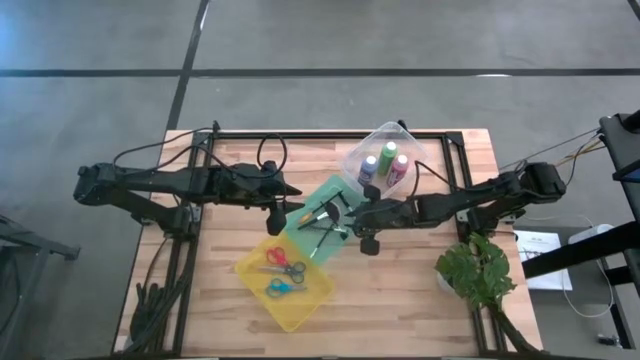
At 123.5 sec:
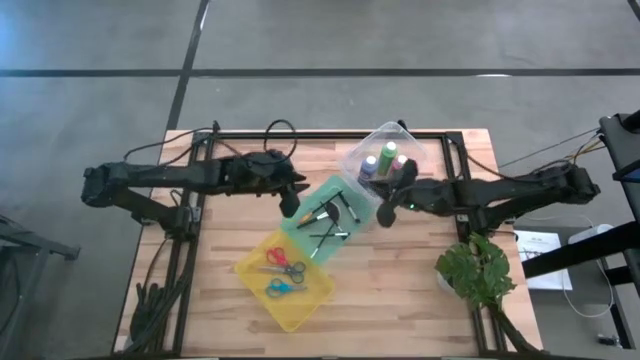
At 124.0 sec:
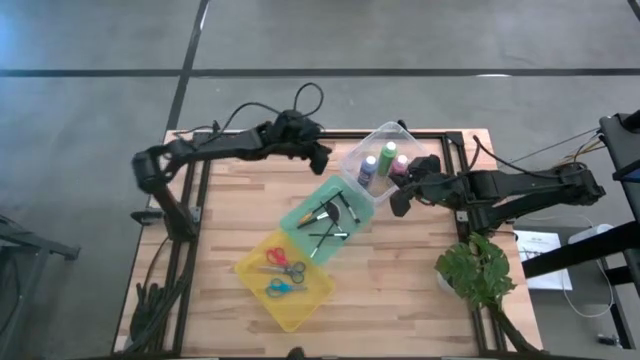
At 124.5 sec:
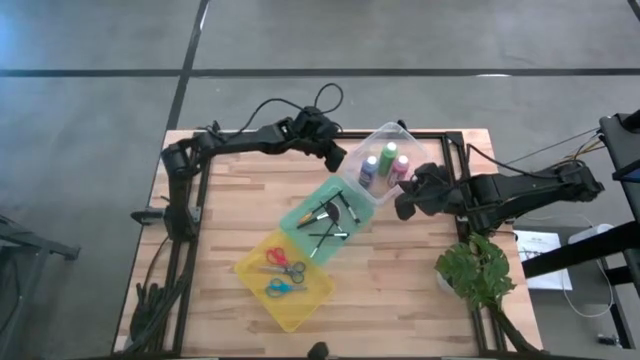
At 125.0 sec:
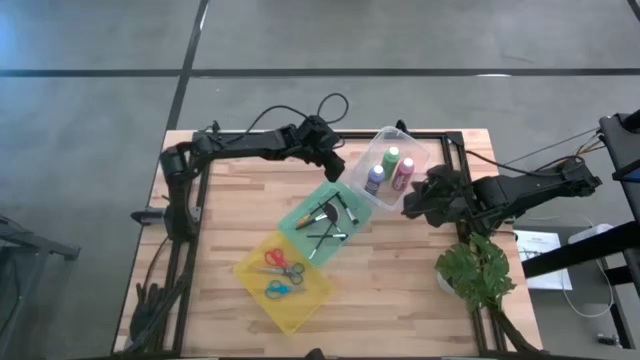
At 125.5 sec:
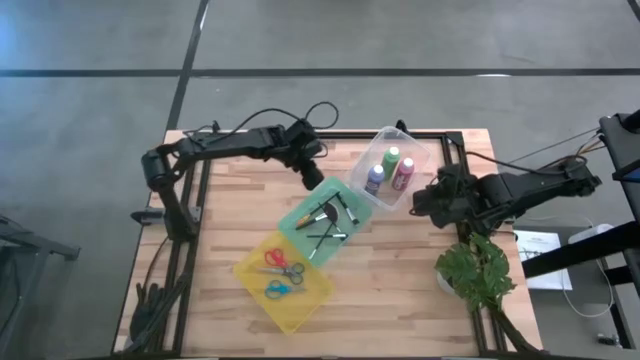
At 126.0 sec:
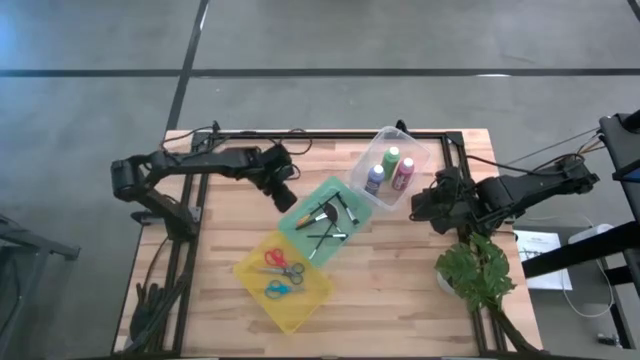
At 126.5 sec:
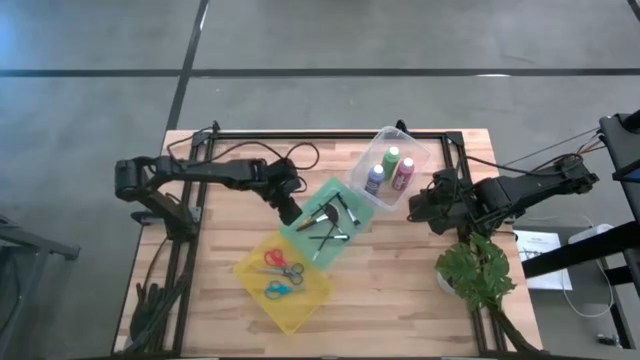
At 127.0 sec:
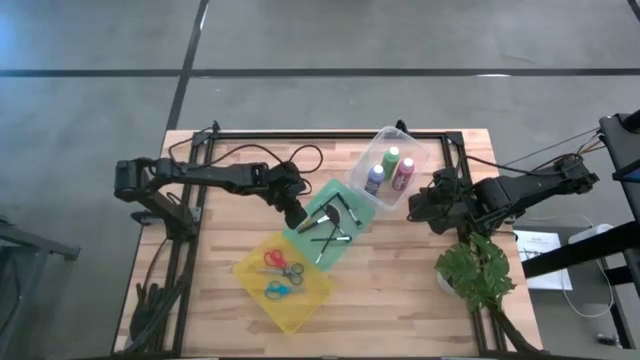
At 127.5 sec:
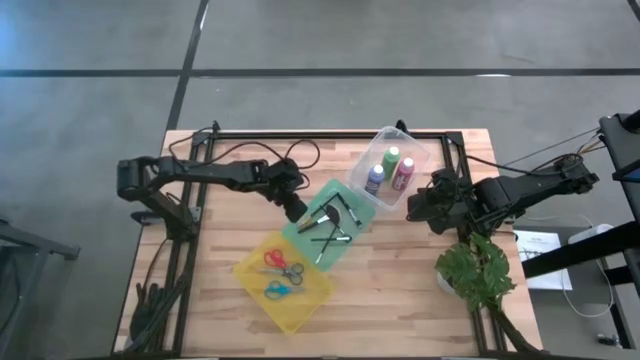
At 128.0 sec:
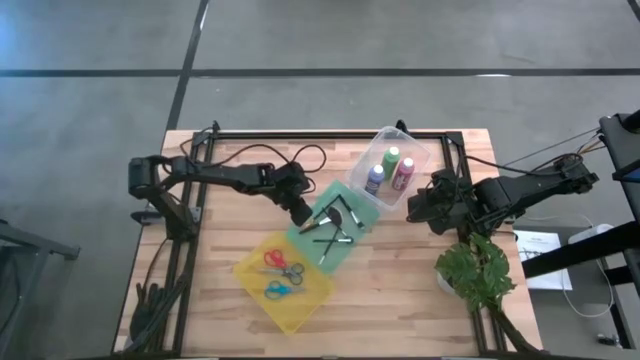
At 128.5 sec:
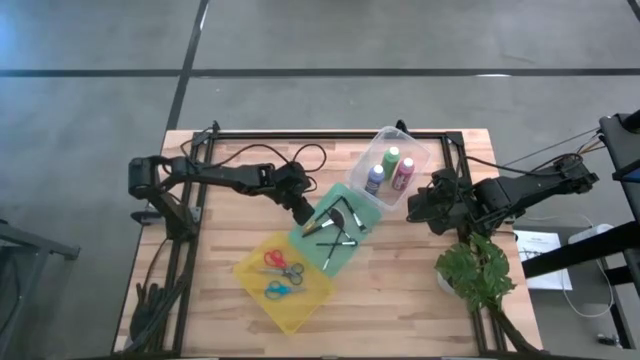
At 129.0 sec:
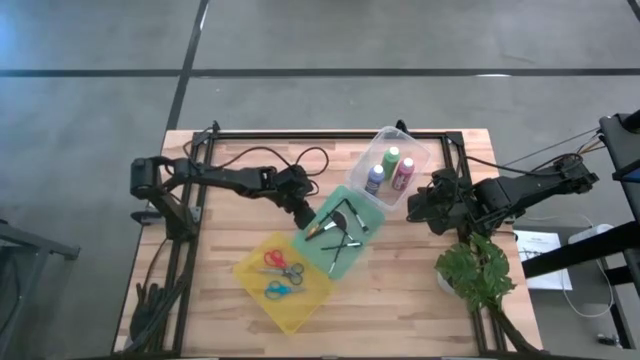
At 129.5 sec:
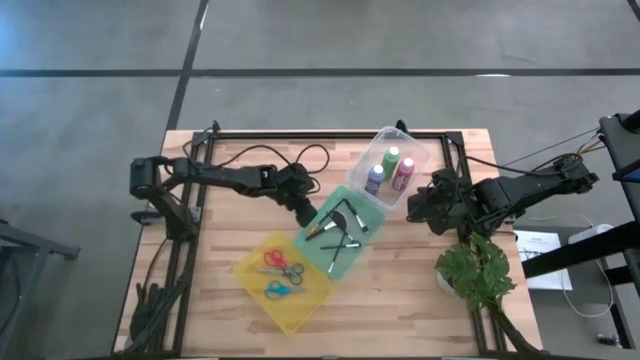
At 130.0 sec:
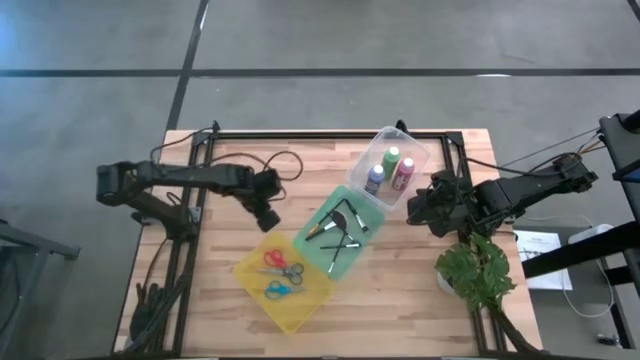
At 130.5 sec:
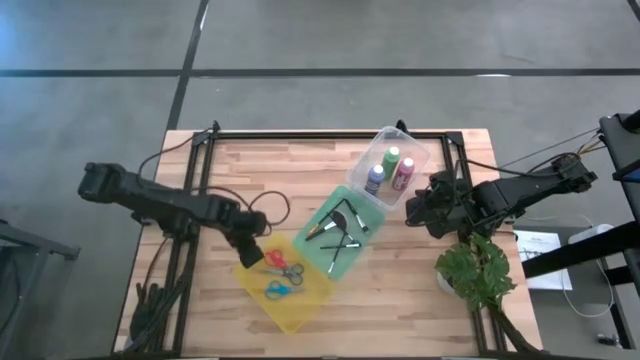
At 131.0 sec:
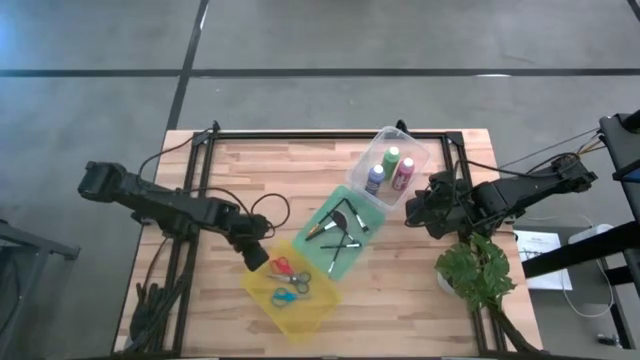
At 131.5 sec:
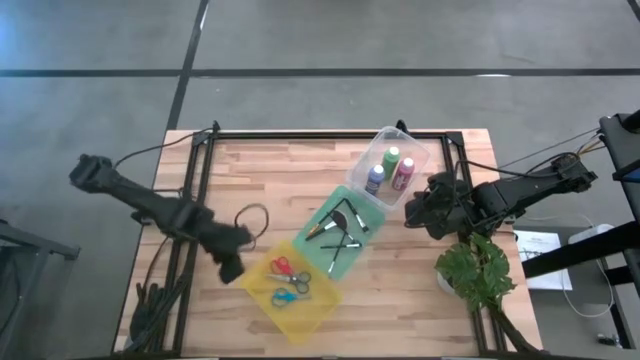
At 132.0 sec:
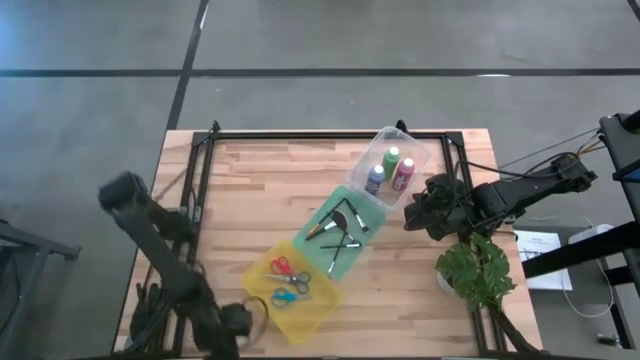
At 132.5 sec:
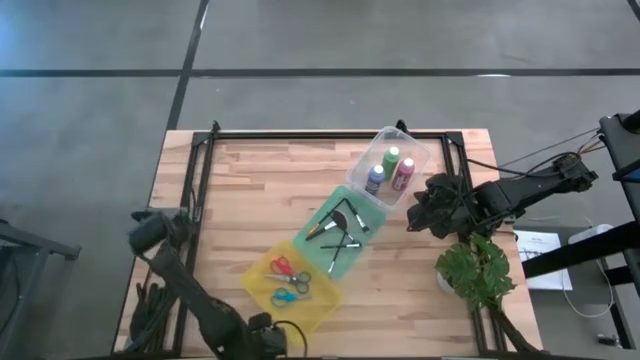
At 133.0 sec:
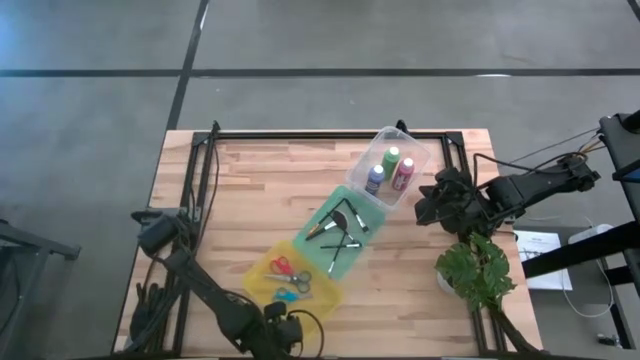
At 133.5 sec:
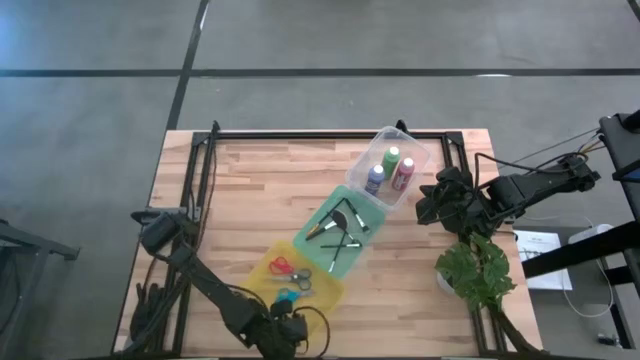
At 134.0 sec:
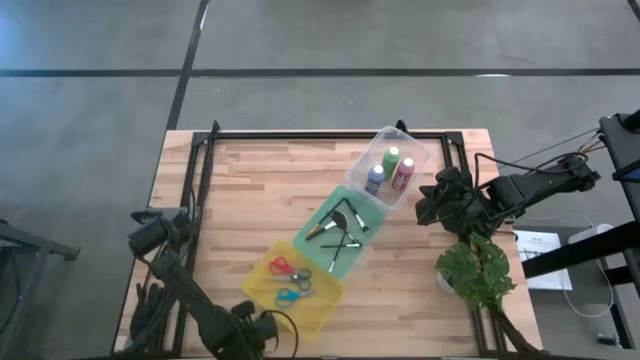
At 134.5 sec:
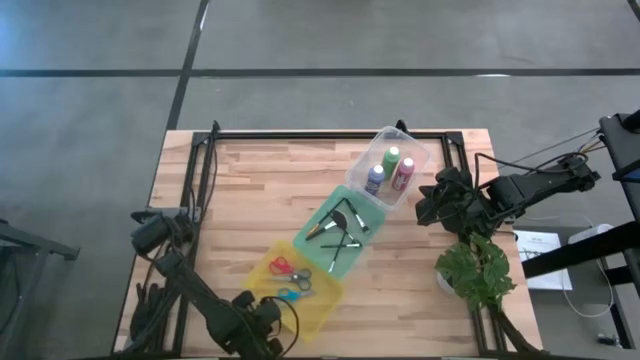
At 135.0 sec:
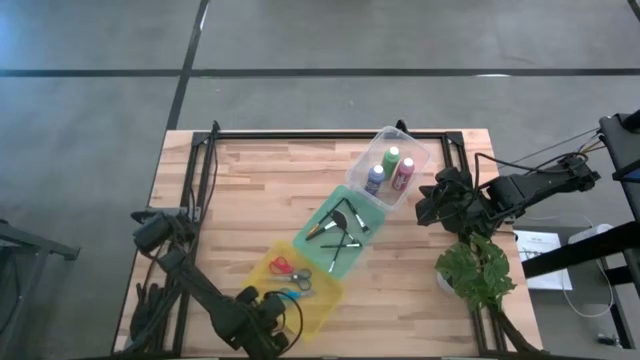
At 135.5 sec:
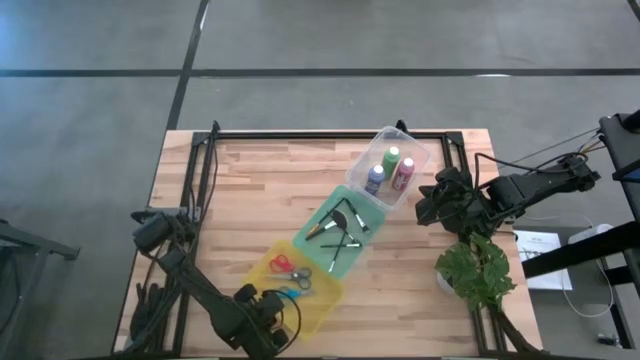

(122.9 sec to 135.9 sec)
Task: Pick & Place Paint Supplies
Adjust the bins

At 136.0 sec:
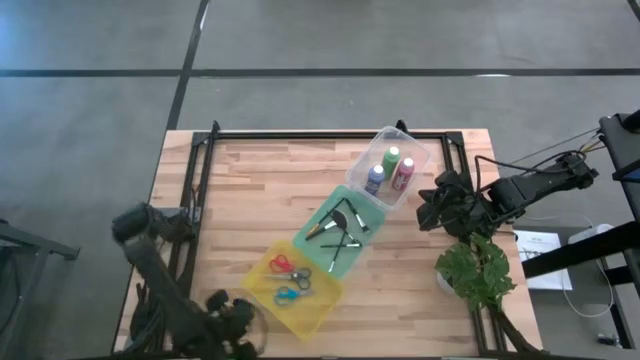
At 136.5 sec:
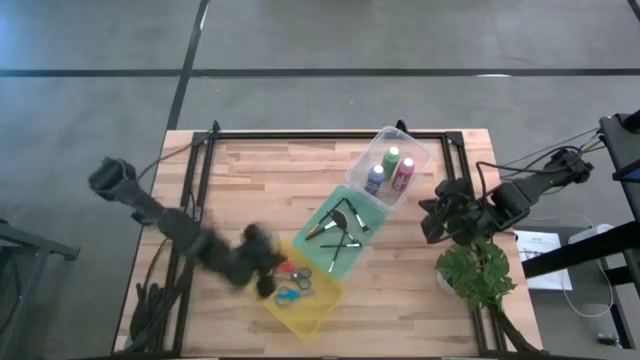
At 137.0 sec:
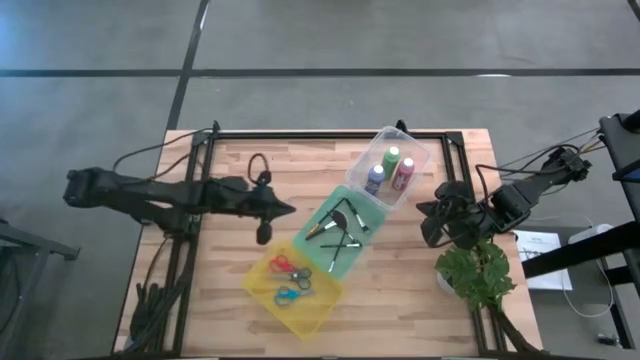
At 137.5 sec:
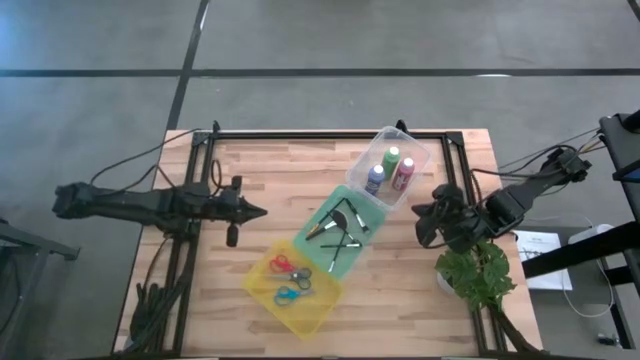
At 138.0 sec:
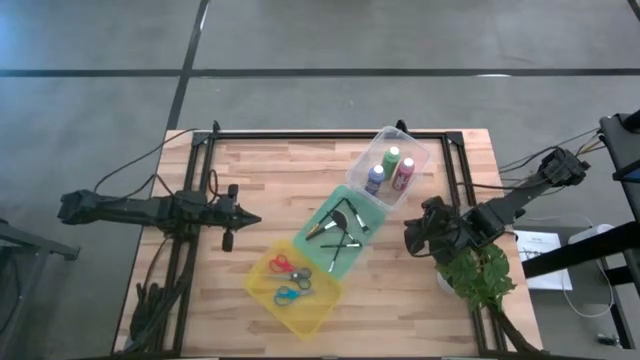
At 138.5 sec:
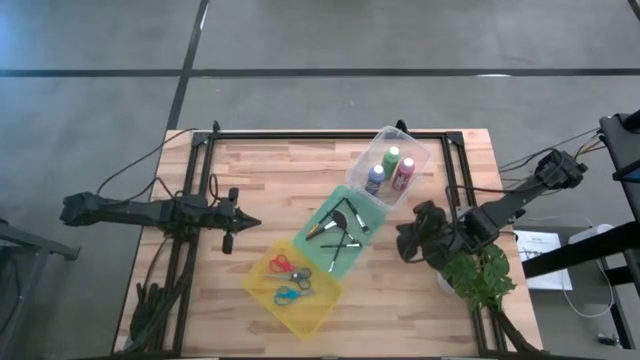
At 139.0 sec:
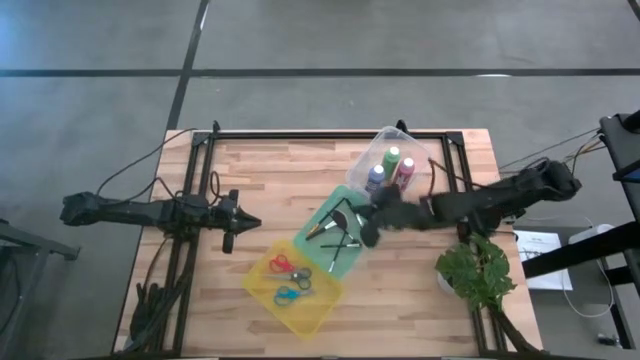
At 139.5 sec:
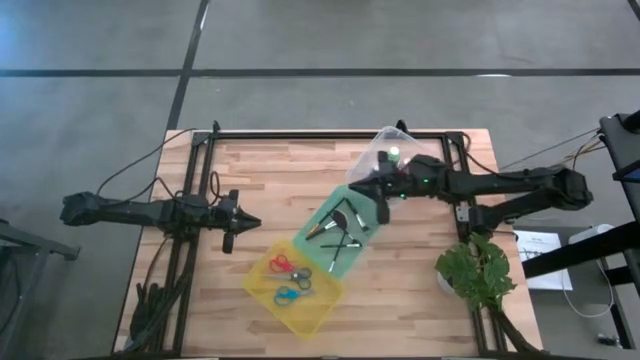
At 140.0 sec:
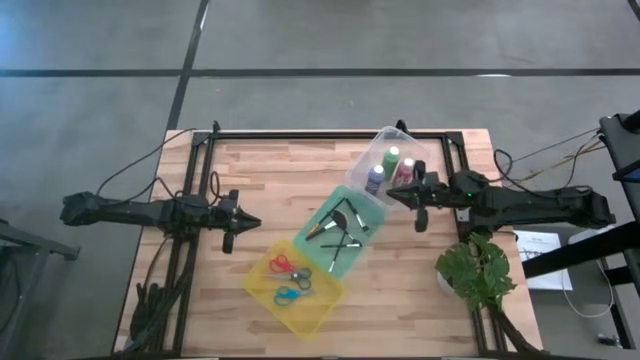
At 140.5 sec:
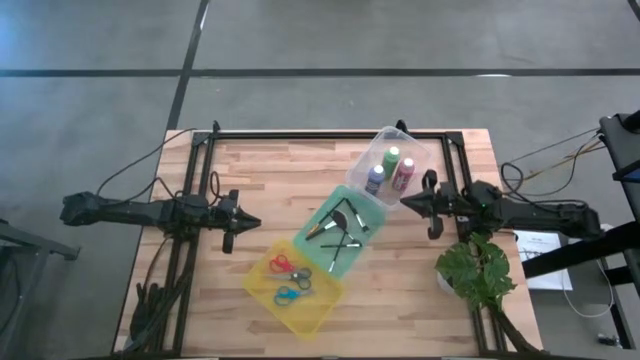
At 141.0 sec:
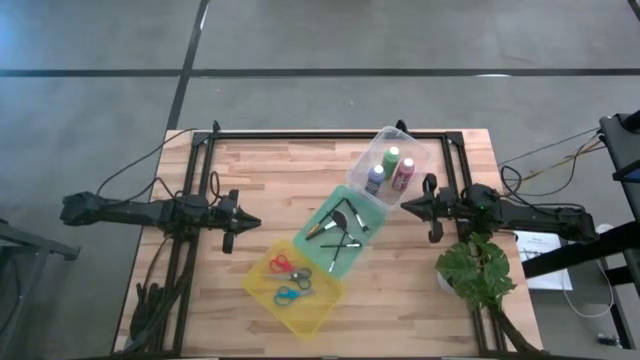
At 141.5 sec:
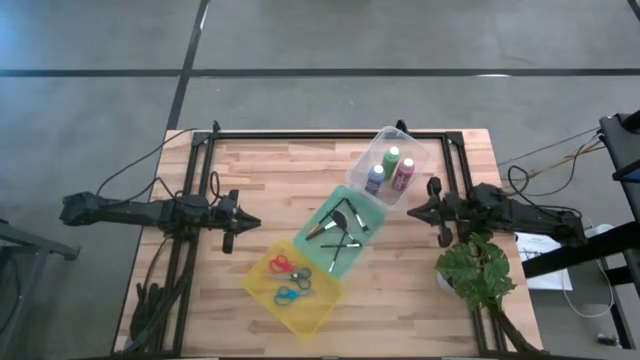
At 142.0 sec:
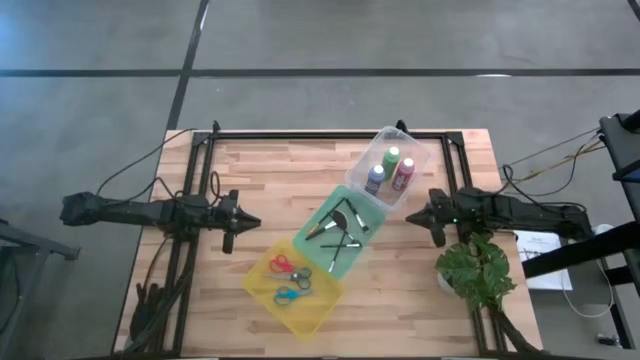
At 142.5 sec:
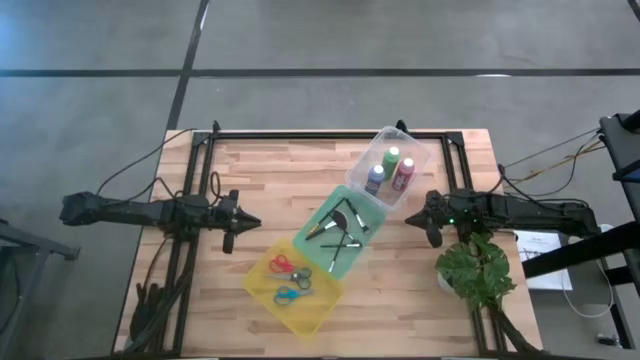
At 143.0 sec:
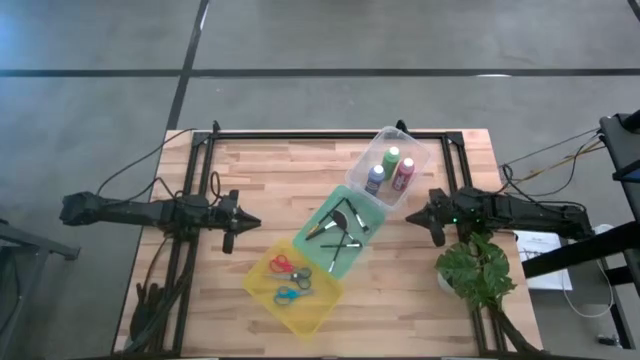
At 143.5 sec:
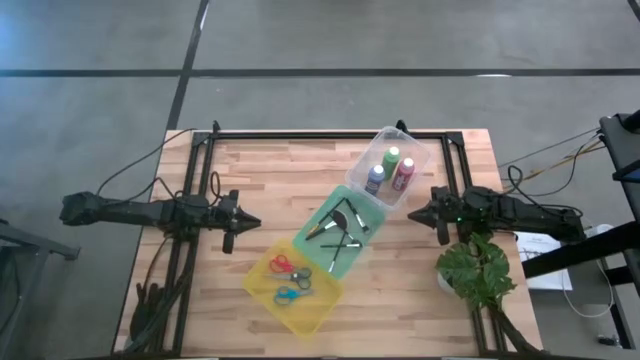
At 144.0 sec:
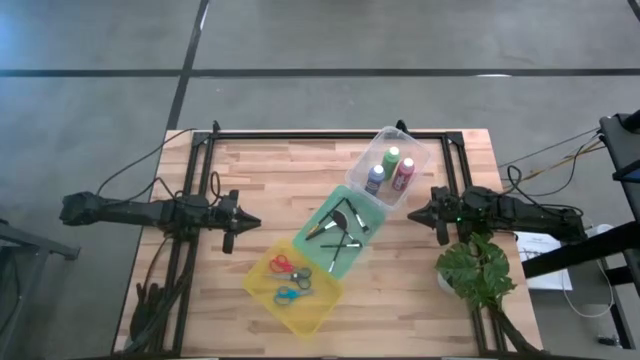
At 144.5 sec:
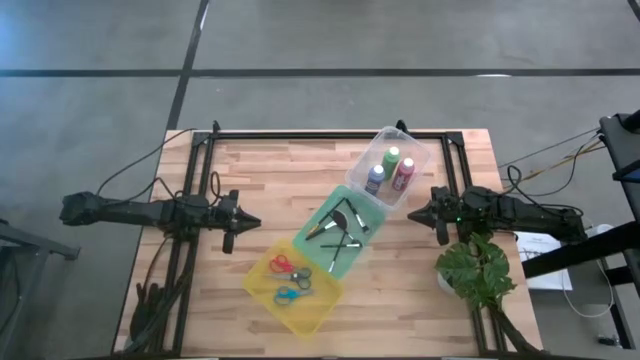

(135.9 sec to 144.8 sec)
Return to Home Position
